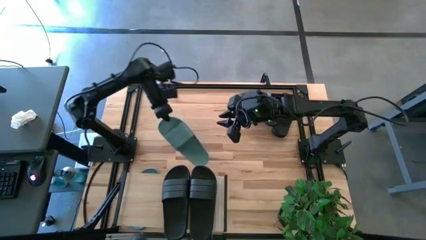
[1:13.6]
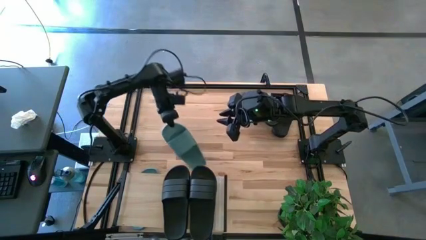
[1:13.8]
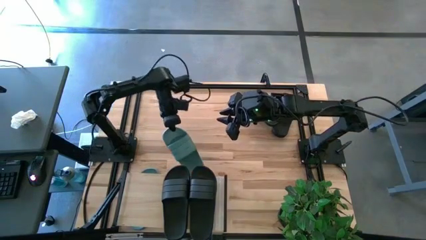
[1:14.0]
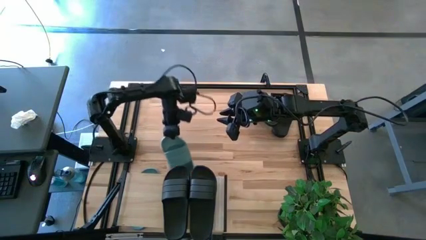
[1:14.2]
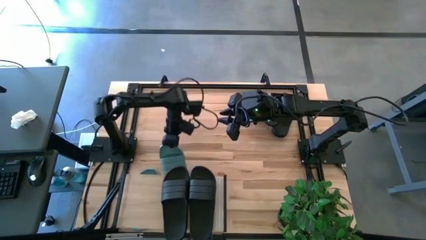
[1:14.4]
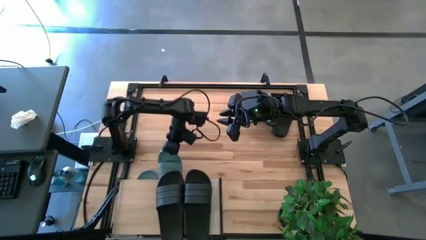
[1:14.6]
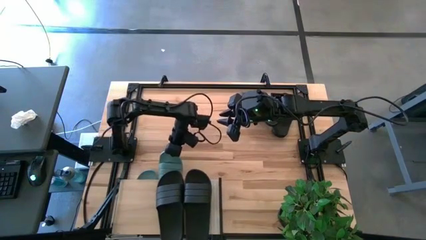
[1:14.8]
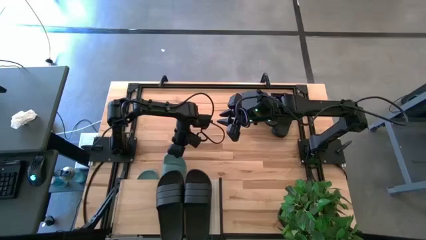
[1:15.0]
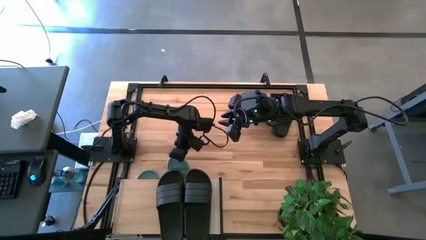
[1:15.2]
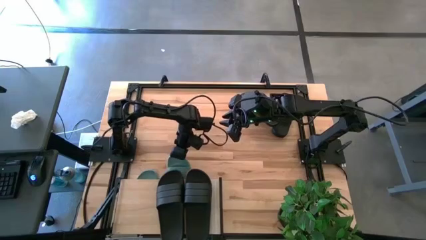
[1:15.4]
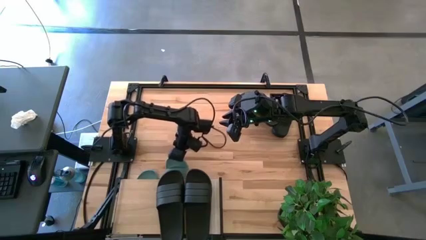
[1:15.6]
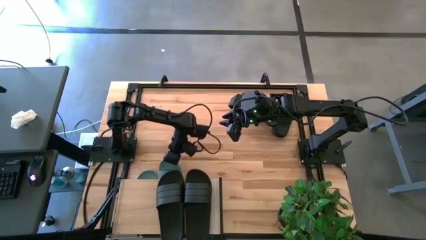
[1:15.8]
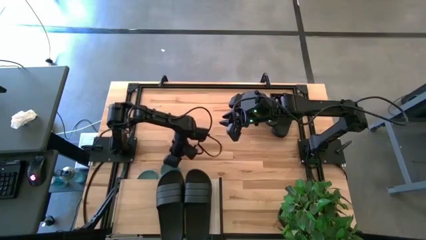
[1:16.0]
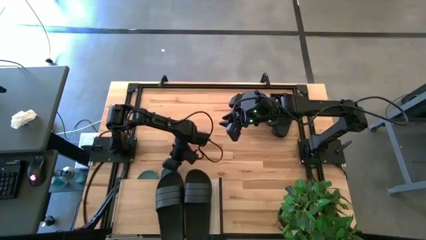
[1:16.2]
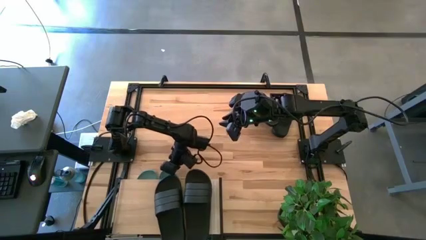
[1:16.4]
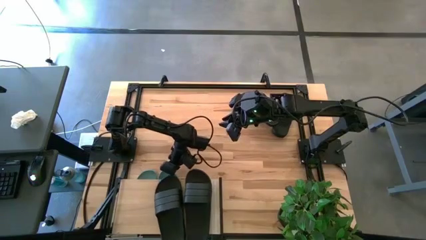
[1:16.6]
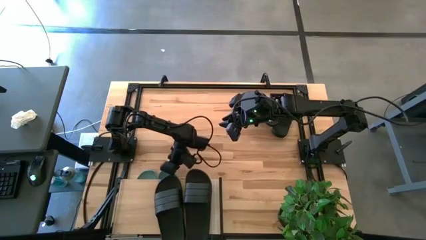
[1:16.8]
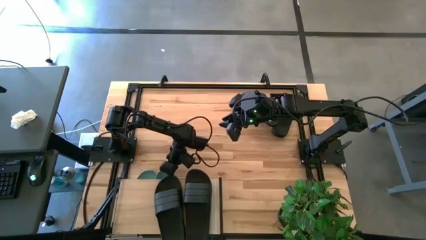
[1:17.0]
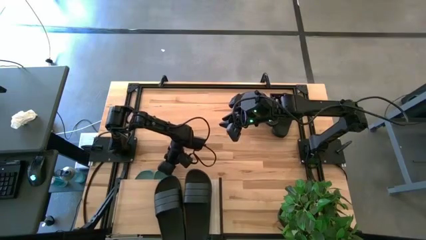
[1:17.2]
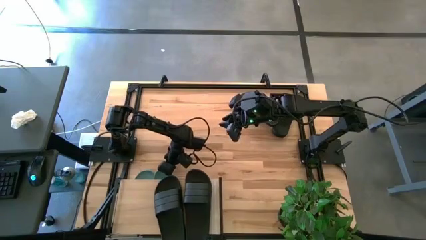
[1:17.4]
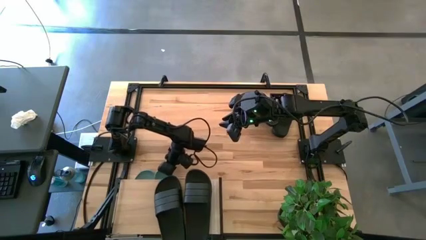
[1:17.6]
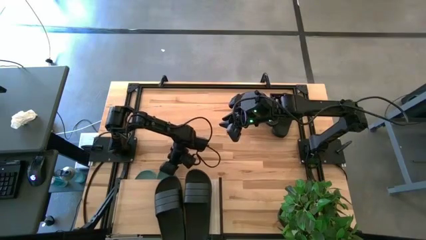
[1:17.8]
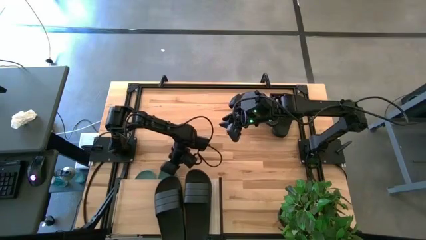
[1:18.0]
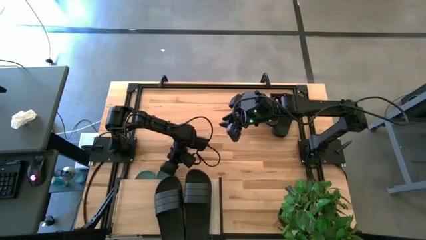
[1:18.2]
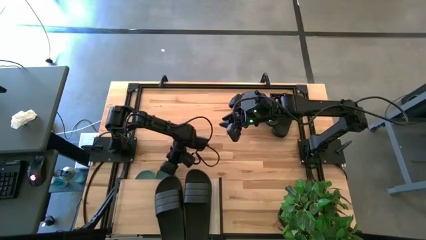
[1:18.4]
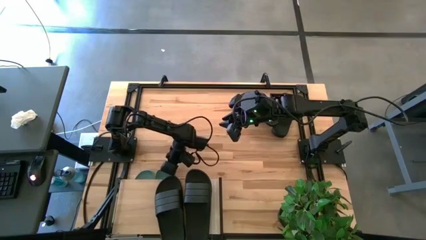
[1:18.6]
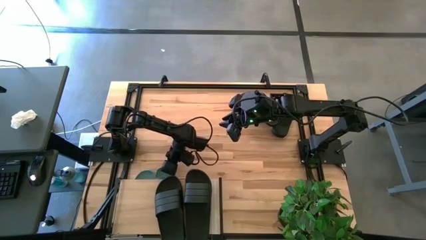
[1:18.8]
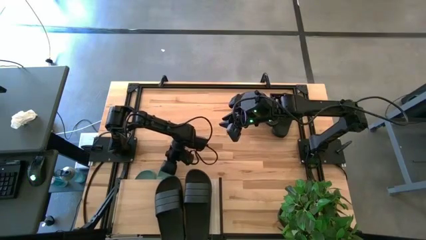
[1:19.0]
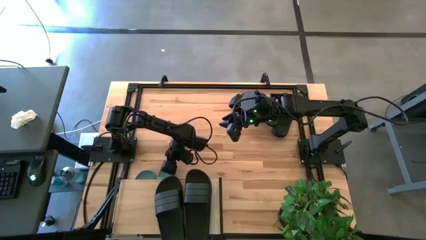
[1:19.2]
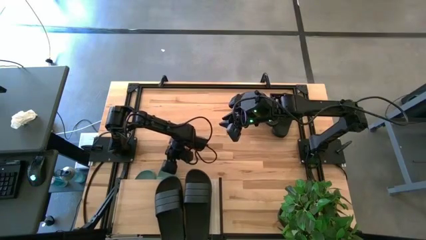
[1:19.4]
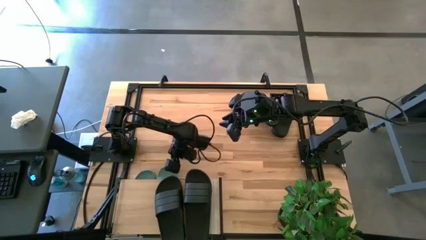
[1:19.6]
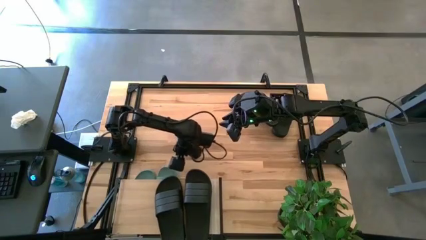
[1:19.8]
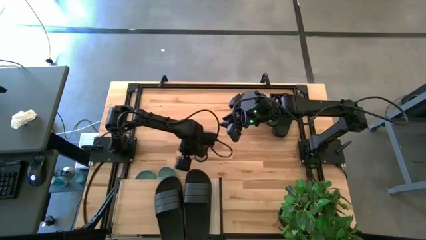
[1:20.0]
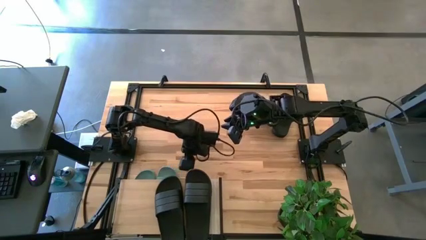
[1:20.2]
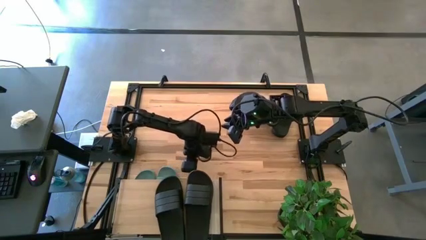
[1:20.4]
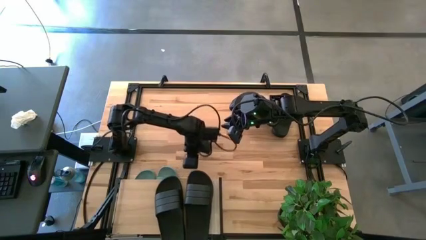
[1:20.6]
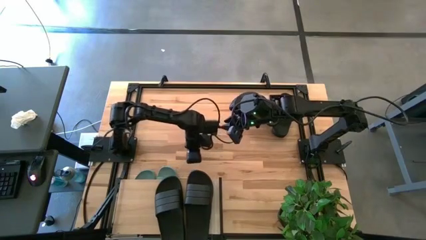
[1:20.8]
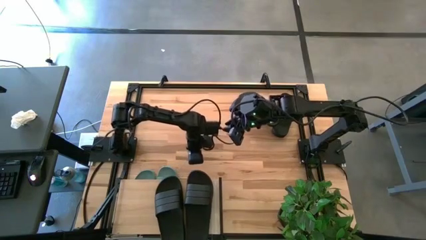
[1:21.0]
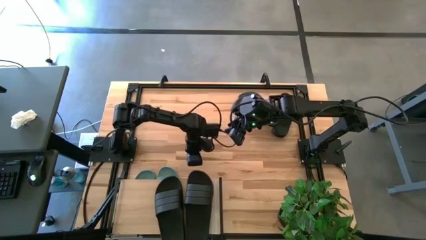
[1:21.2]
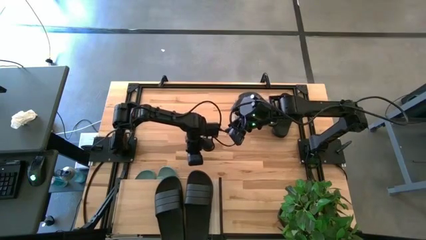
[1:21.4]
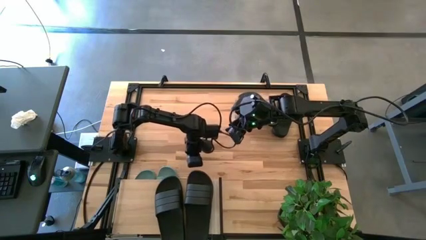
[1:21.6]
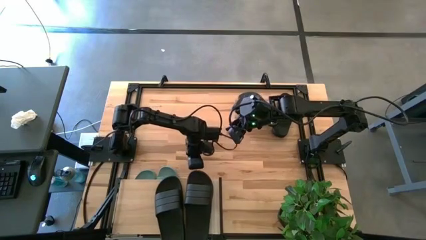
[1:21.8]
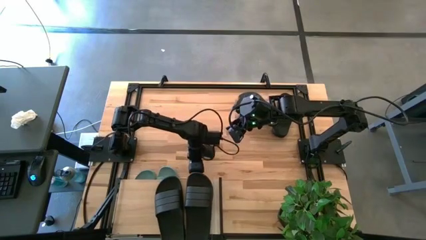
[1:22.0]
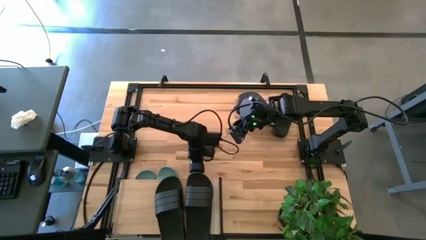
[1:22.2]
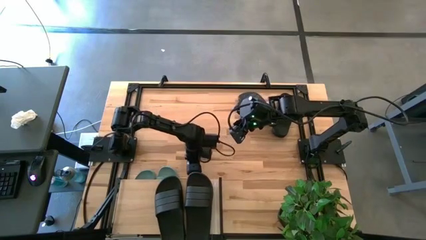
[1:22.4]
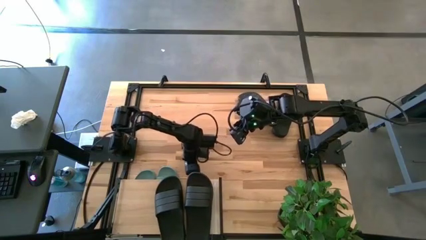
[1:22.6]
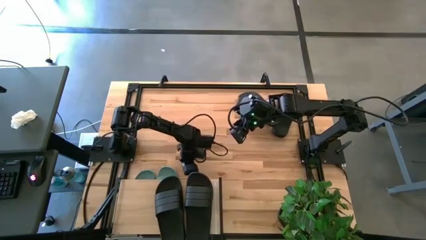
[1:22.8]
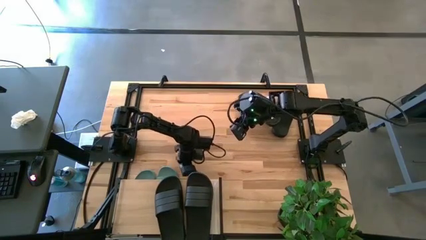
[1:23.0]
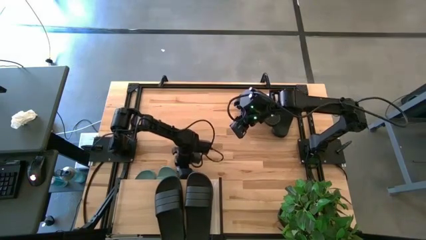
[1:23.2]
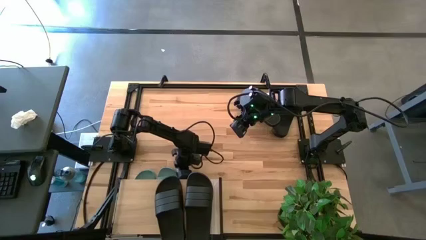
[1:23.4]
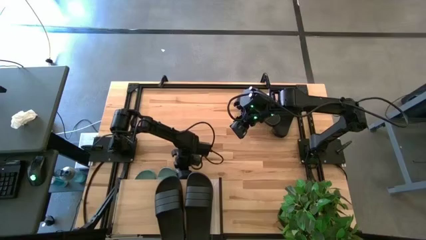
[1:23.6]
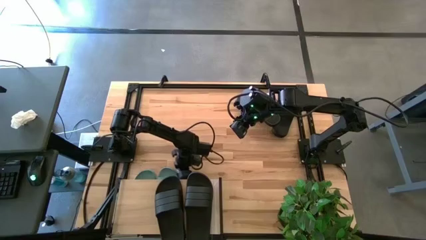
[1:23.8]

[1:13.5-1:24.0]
Task: Pick and place slides into the shelf
Put the green slipper under the shelf

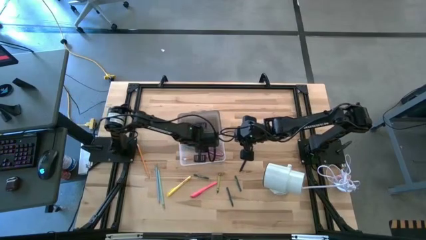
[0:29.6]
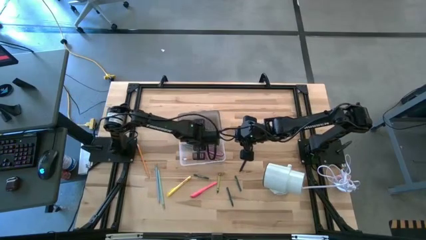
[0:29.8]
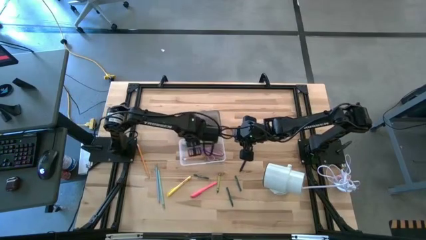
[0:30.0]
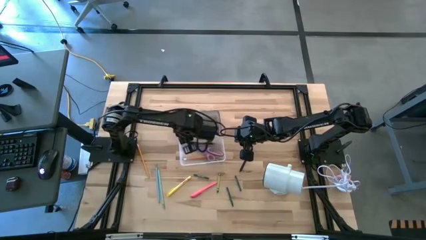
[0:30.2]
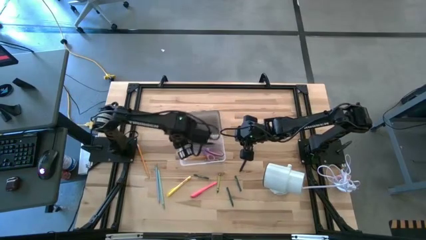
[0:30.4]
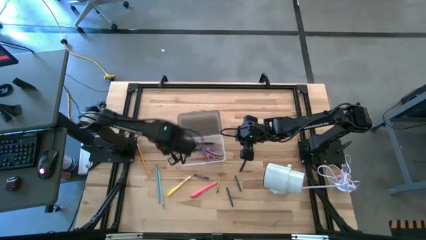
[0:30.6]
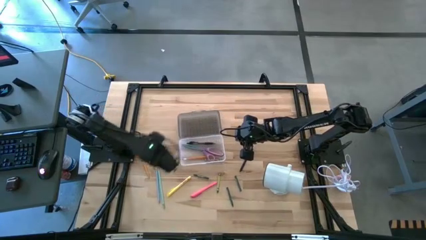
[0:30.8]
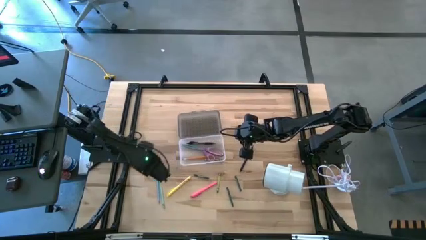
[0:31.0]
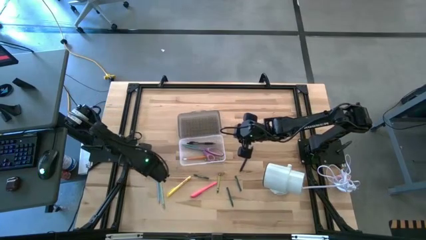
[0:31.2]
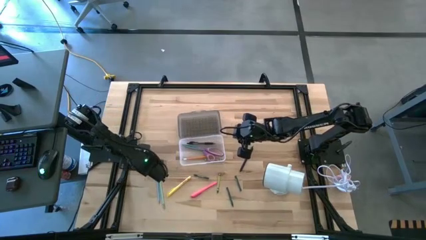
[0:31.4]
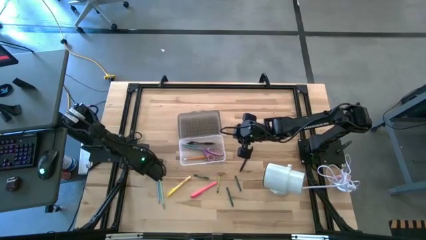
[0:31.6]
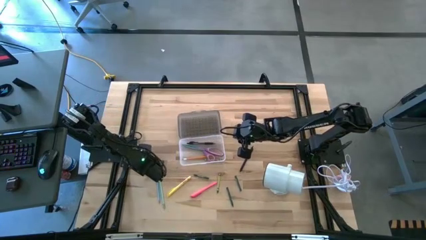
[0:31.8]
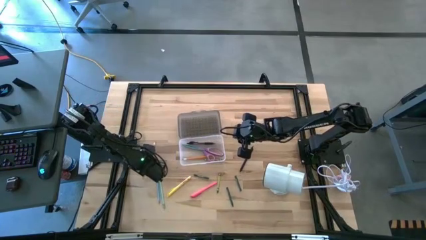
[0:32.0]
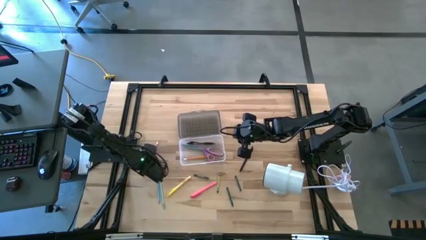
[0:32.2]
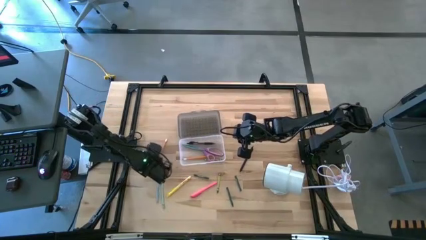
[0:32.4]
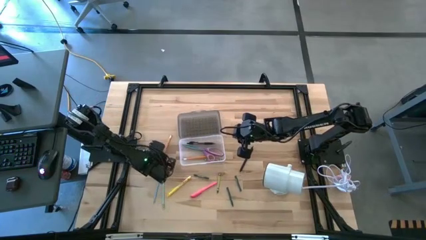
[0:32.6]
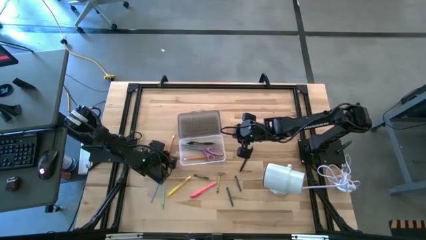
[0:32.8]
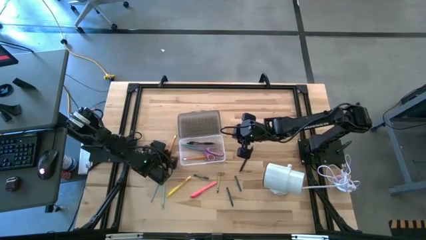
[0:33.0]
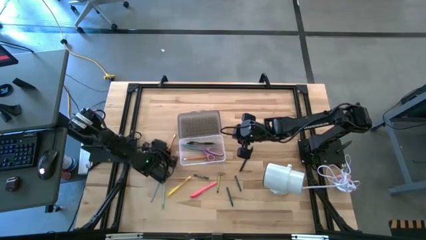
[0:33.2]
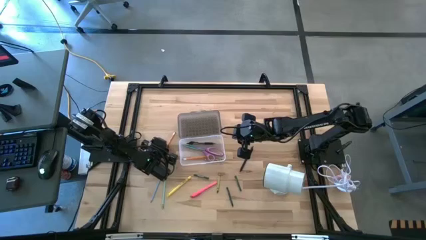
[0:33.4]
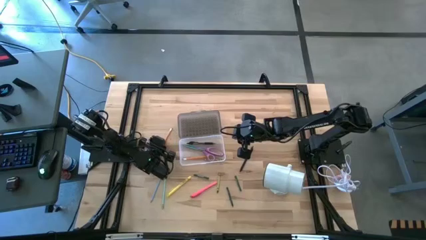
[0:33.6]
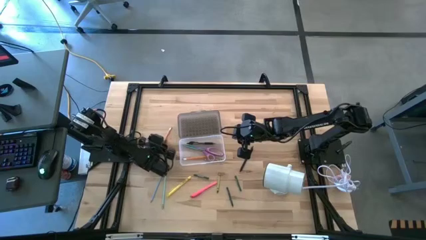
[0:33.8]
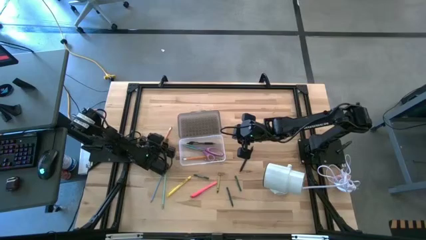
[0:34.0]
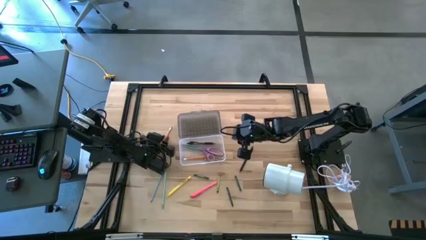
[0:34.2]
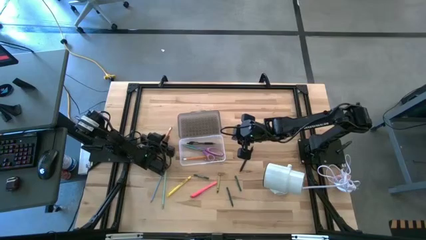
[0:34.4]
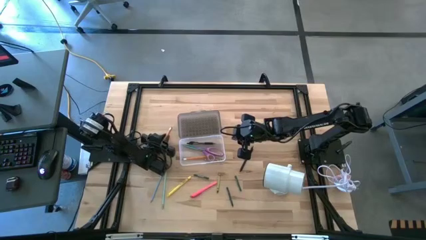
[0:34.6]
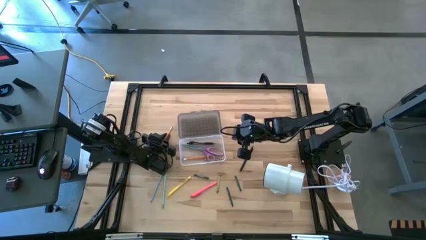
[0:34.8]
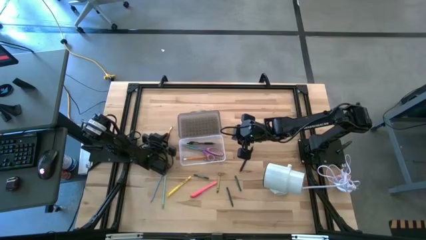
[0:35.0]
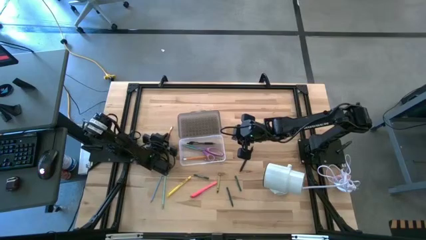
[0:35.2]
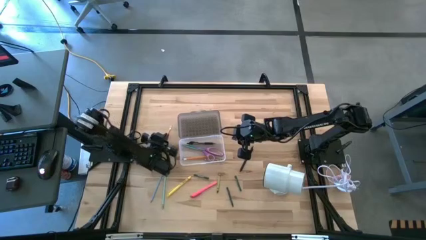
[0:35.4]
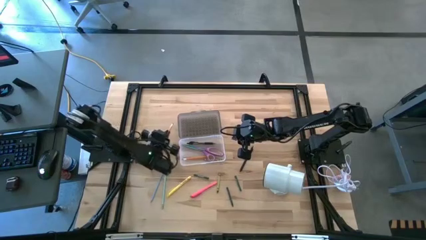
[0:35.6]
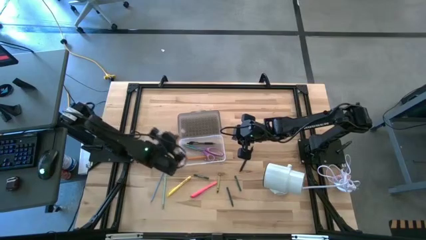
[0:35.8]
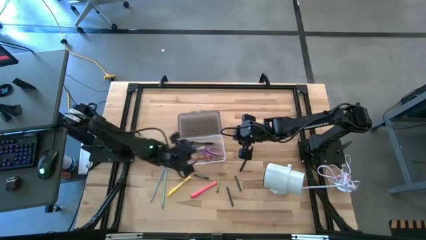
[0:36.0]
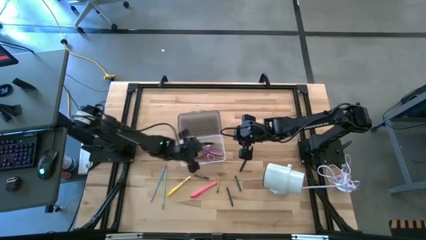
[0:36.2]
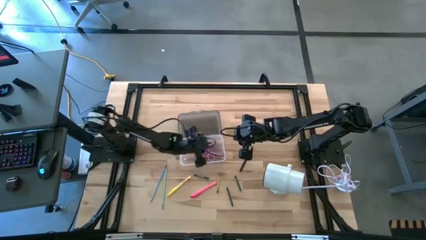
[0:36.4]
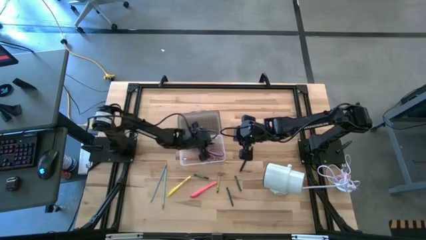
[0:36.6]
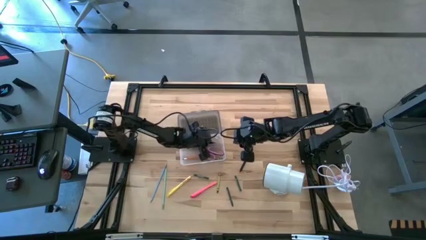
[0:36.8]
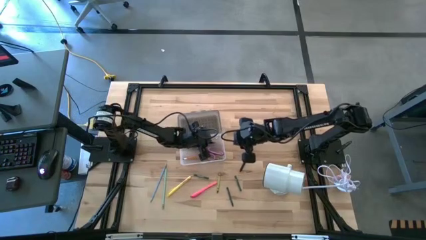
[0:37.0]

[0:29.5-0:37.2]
Task: Pick & place school supplies into a supply box
Put the orange pencil into the gray supply box
